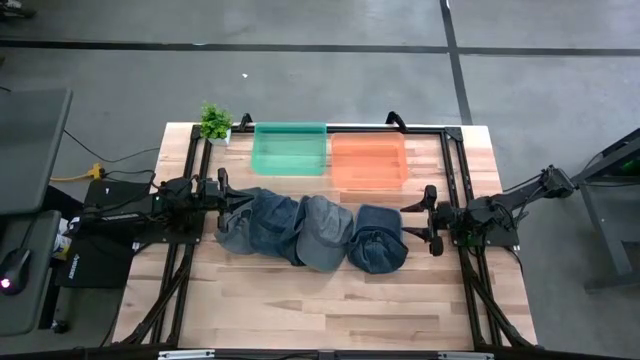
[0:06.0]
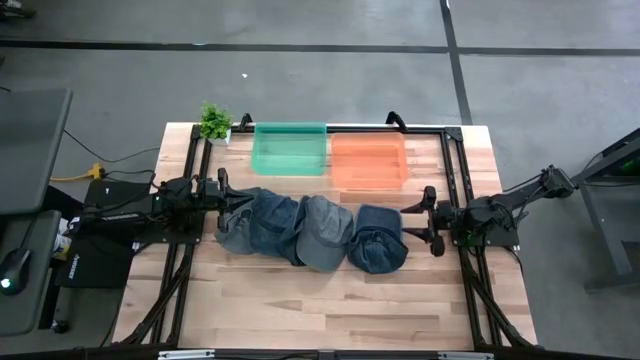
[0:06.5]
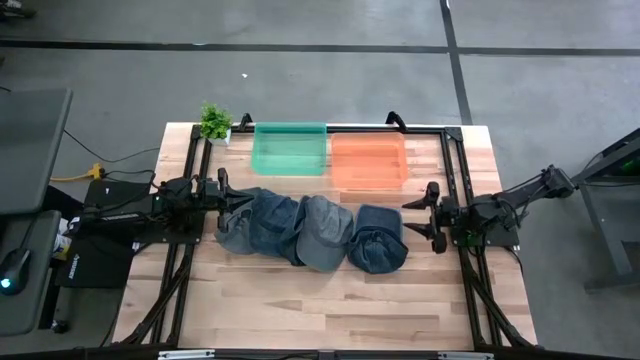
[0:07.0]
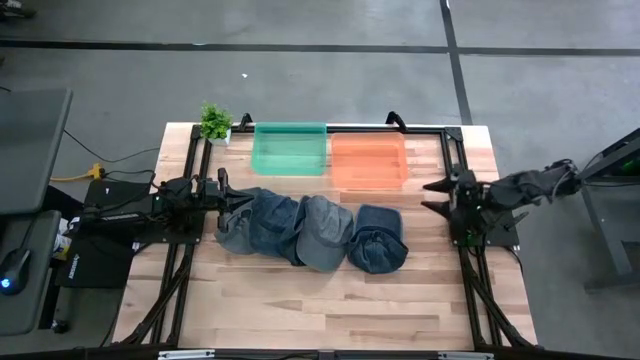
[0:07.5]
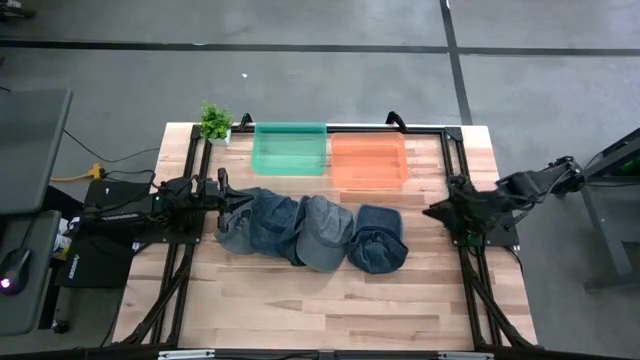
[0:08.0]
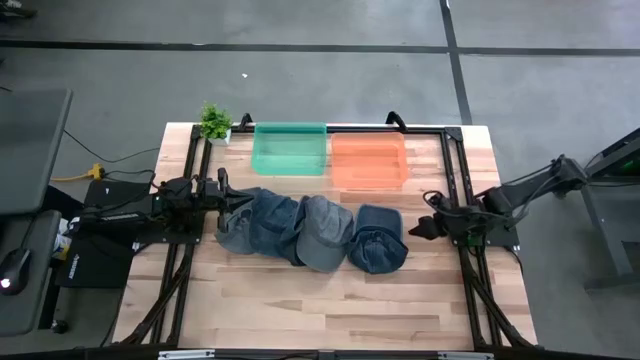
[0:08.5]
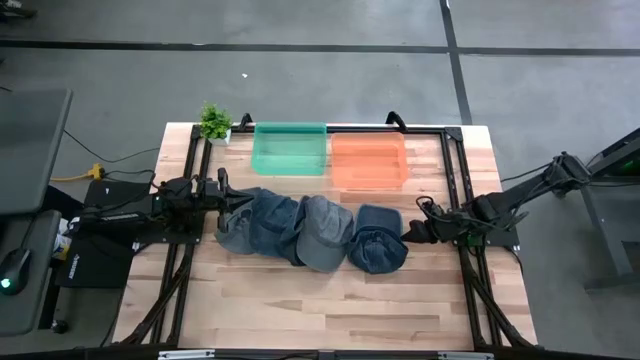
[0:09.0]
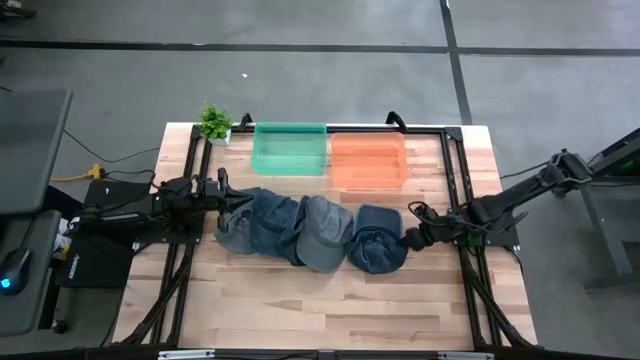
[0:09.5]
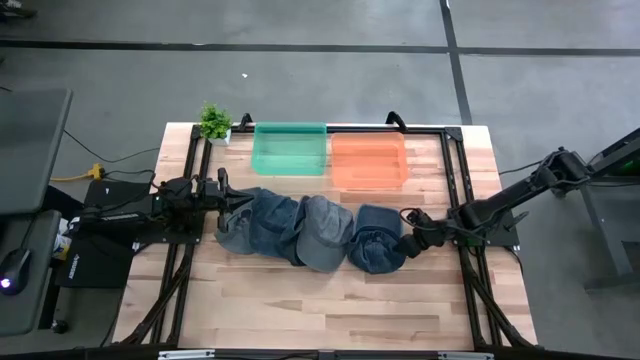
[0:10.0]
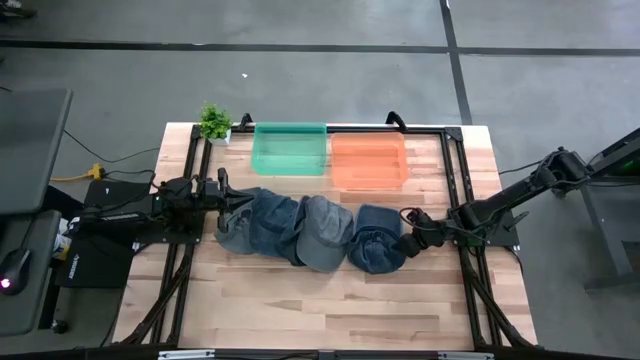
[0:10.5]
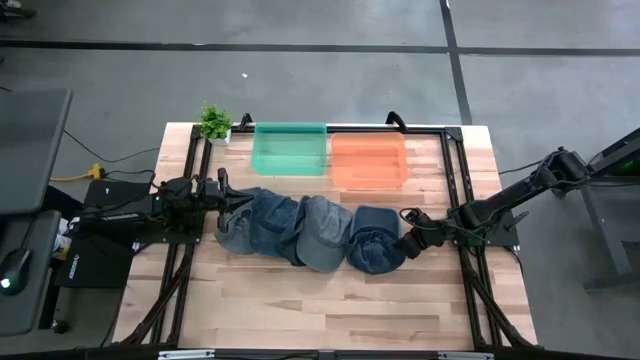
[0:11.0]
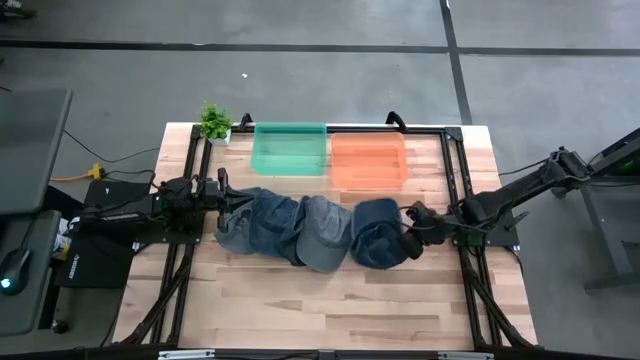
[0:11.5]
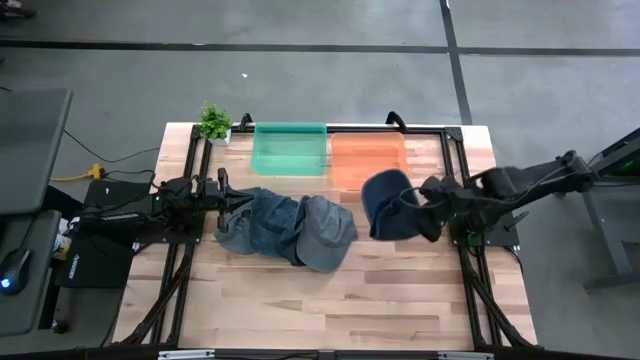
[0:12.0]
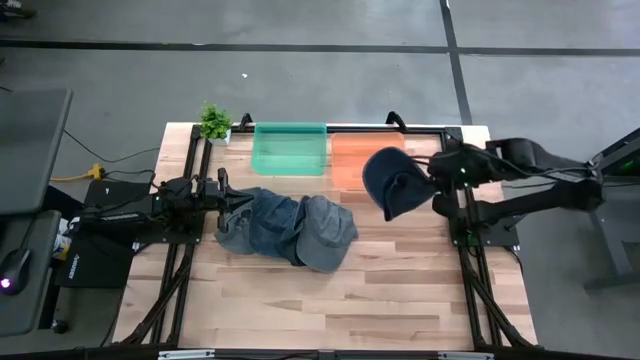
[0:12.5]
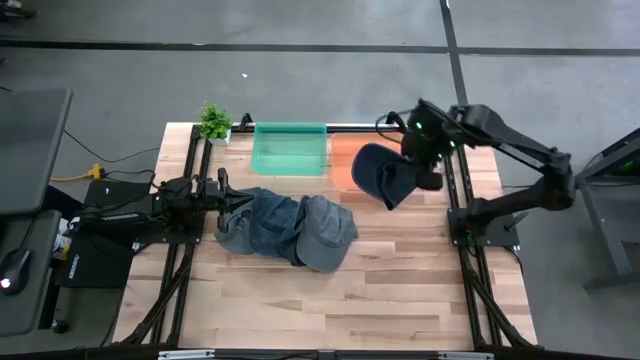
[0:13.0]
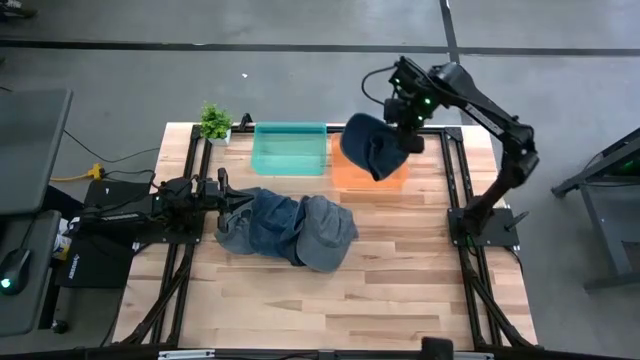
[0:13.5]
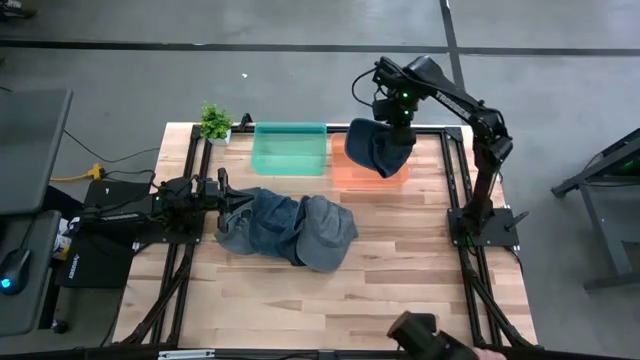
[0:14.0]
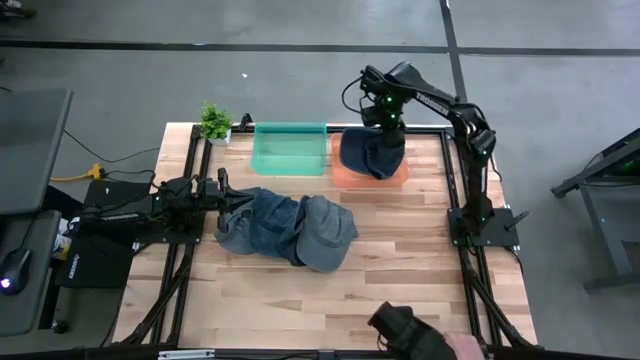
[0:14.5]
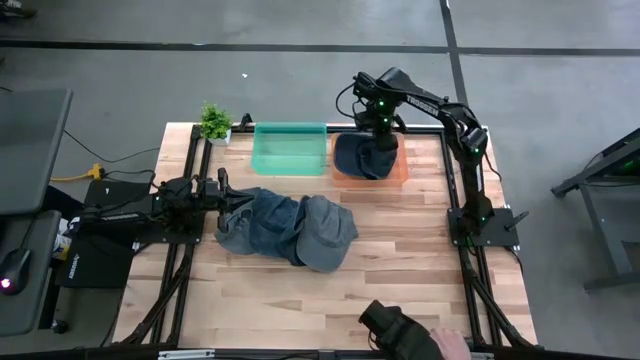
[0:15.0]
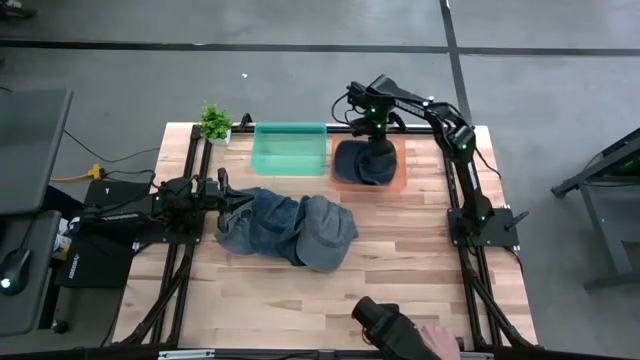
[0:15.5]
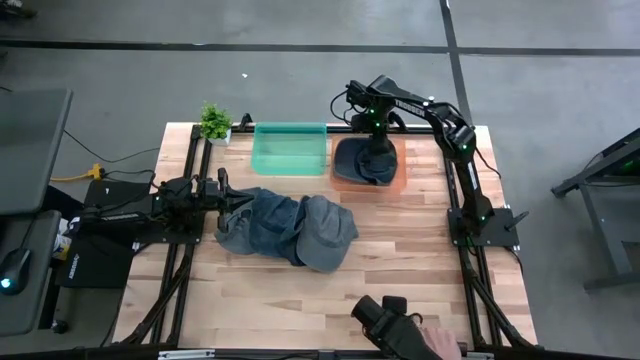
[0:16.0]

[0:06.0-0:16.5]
Task: Pick & Place hat
Put the right blue cap into the orange bin

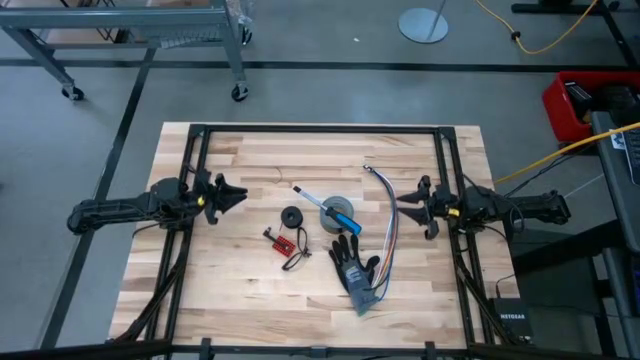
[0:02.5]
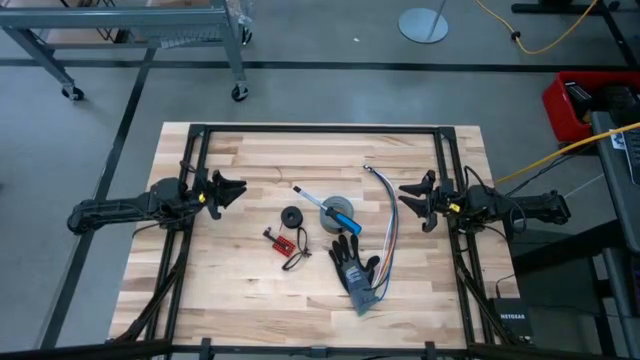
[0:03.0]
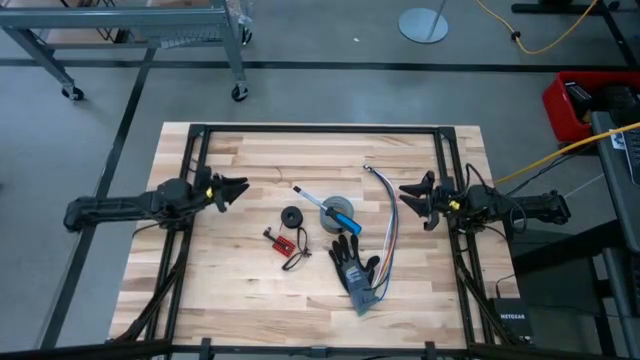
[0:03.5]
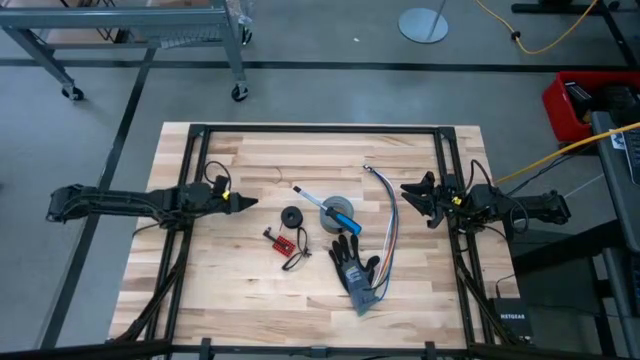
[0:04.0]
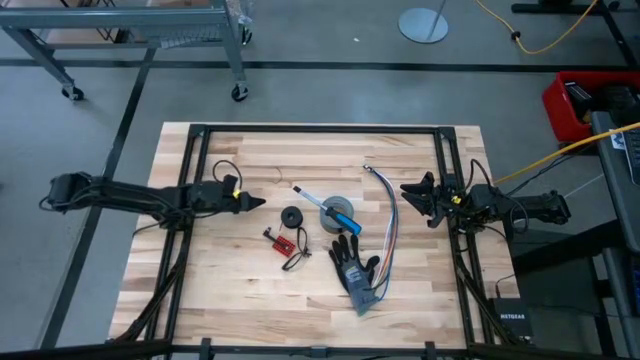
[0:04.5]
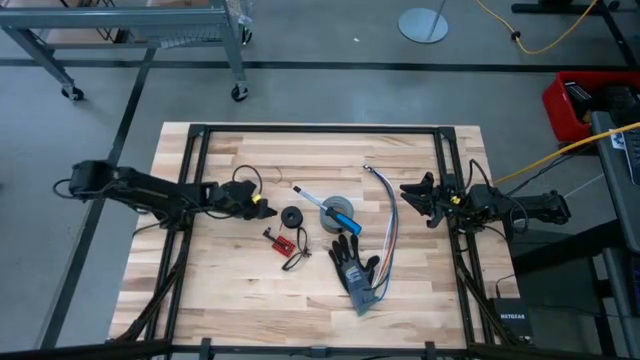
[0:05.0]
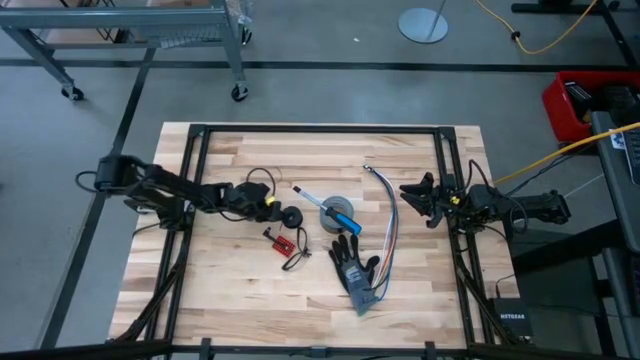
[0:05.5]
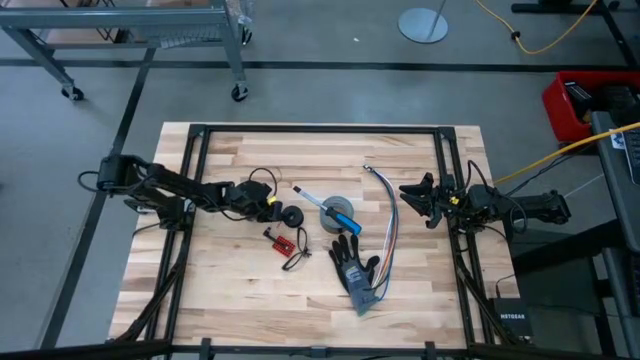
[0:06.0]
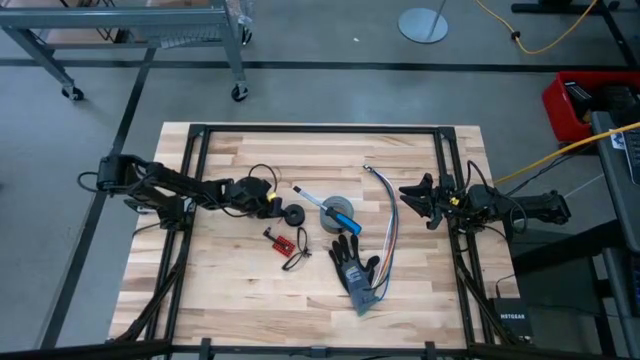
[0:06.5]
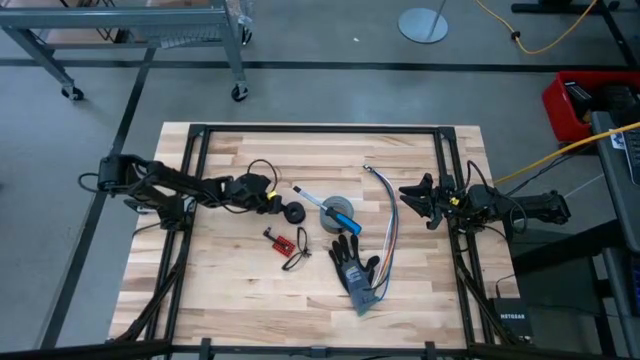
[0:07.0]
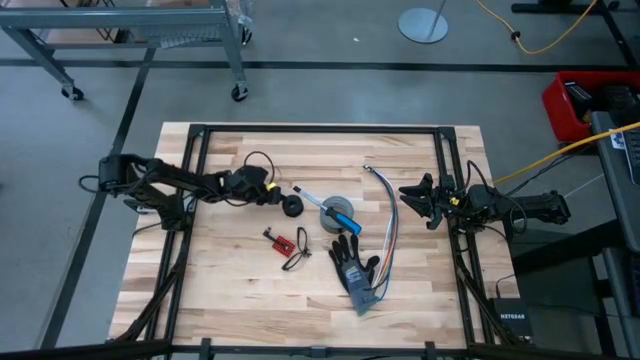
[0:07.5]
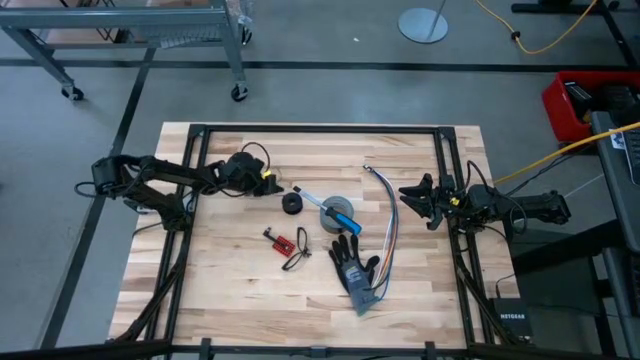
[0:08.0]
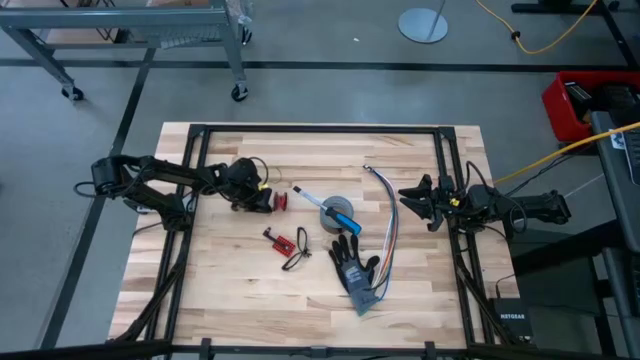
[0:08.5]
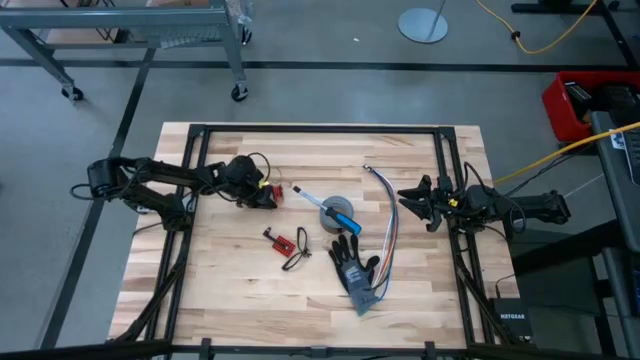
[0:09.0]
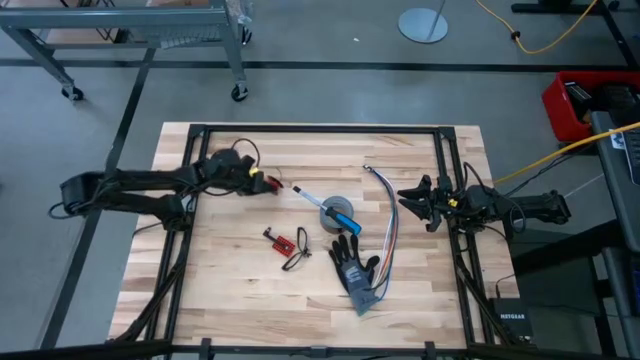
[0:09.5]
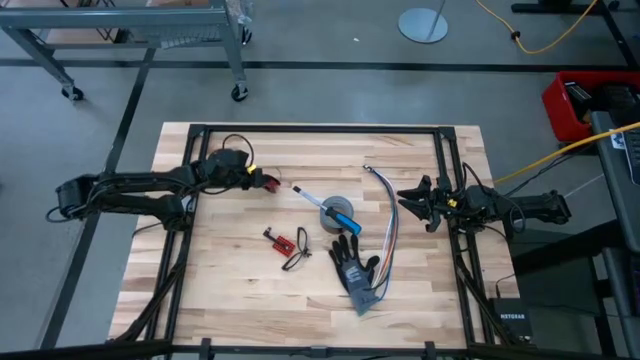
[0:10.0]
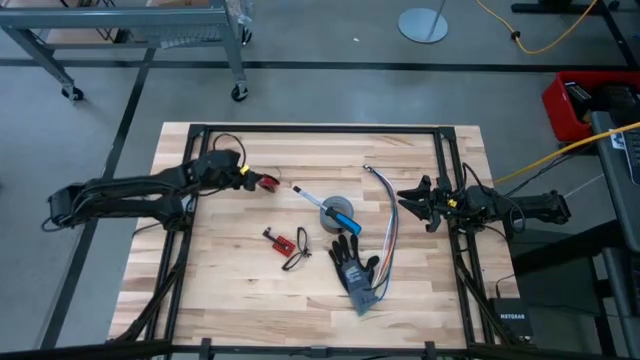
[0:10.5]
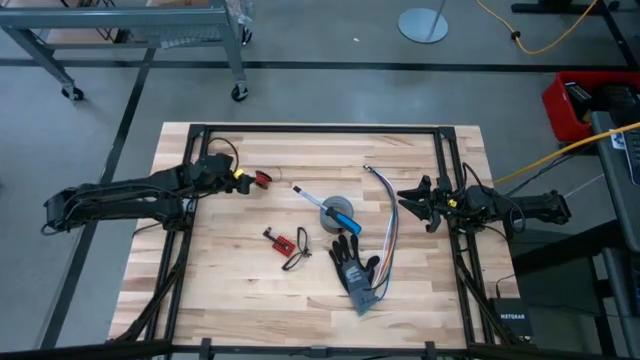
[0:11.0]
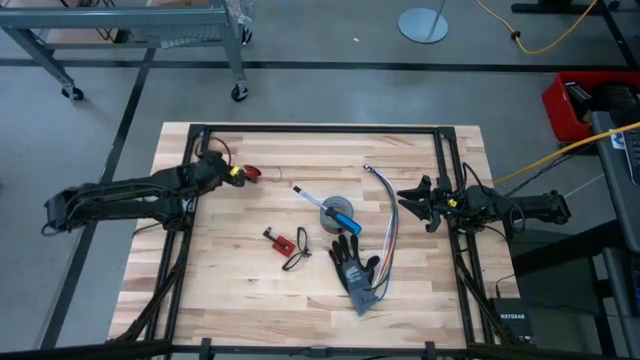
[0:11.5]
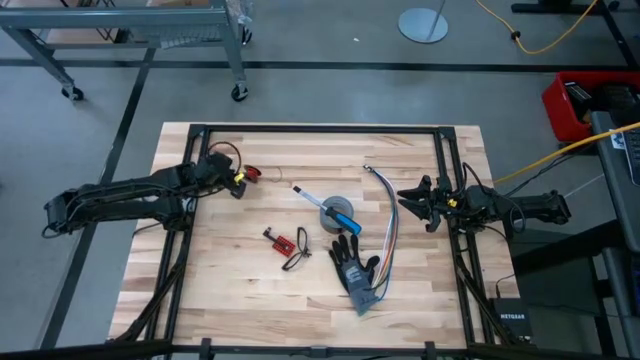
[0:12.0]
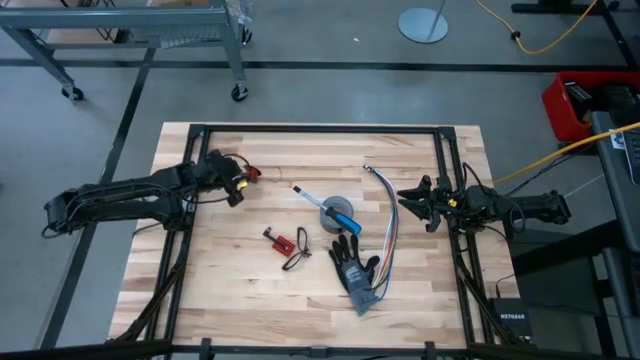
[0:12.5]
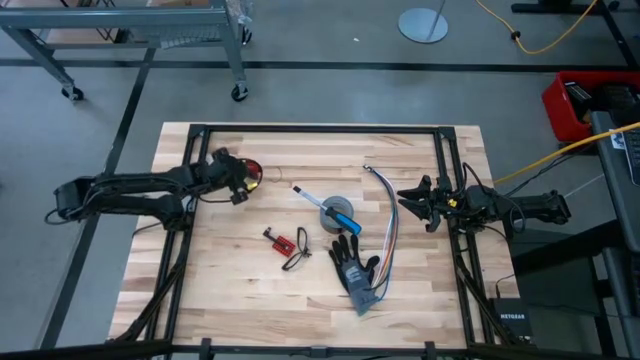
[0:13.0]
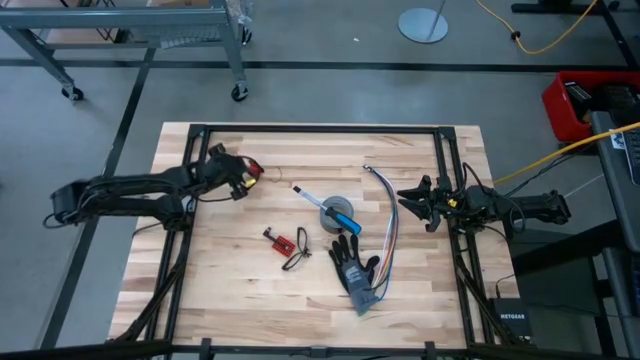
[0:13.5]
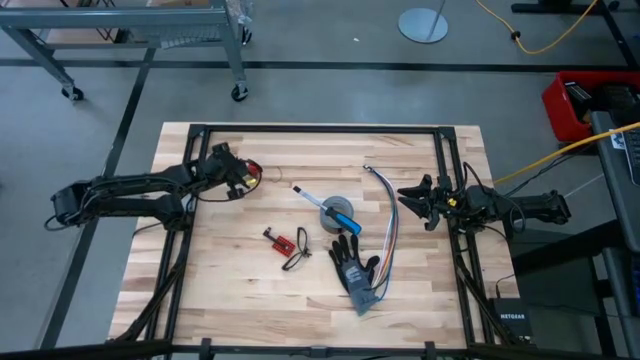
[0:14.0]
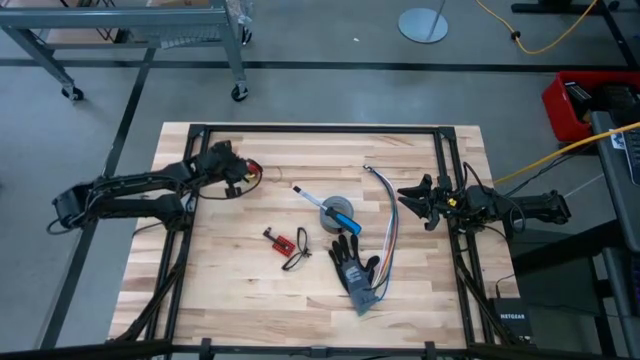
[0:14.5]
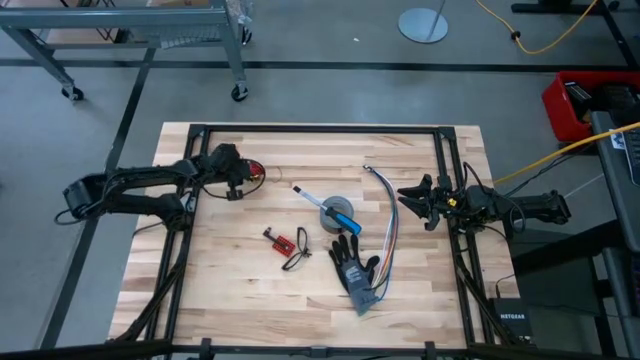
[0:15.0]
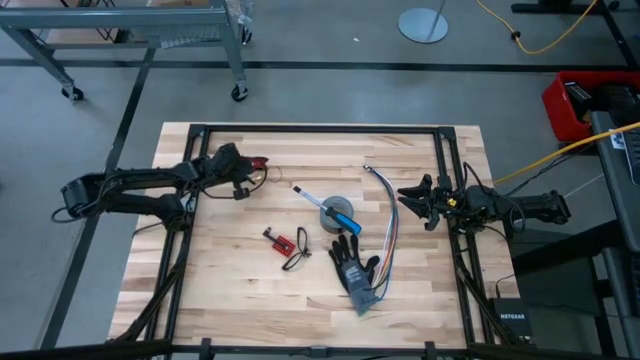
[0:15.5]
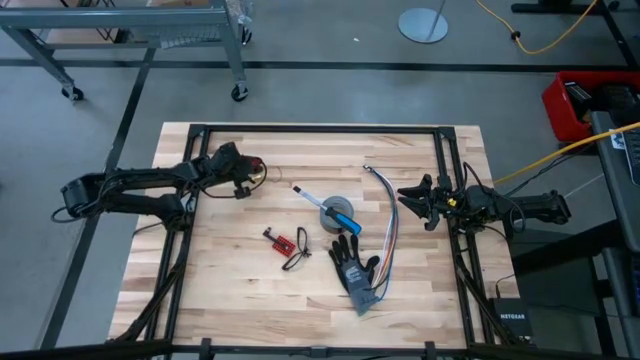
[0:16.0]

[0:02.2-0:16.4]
Task: Coil cords
Uncoil the red wire from the spool
